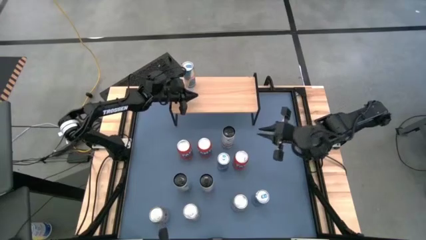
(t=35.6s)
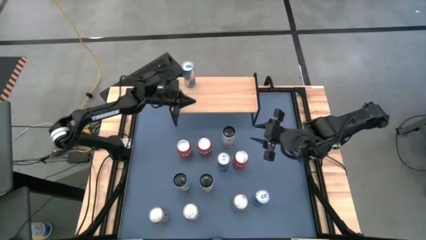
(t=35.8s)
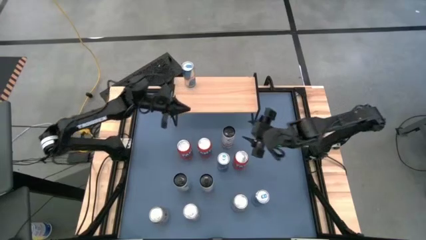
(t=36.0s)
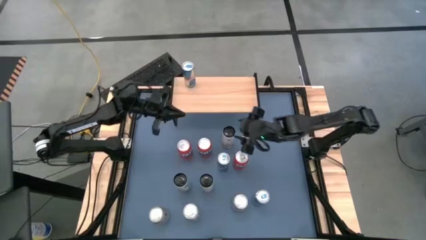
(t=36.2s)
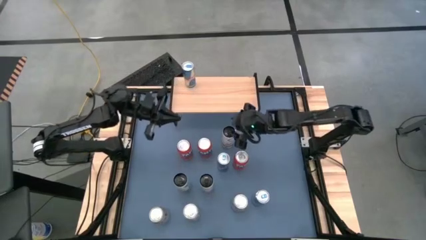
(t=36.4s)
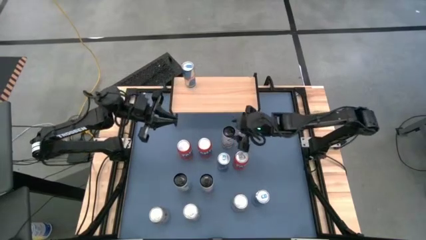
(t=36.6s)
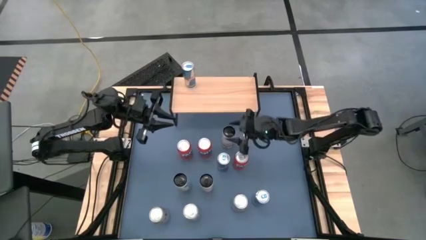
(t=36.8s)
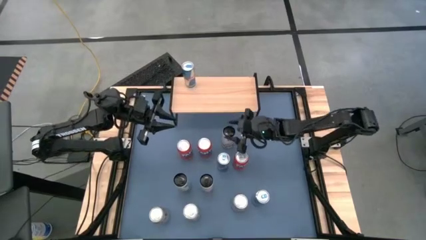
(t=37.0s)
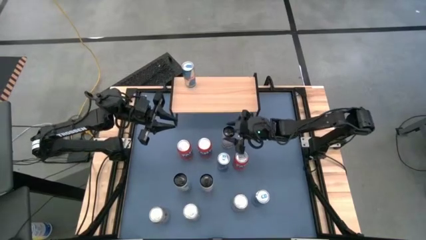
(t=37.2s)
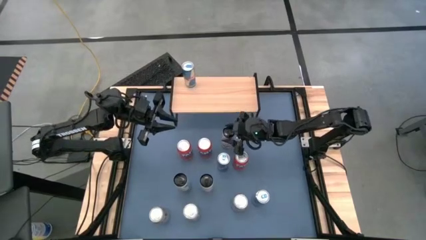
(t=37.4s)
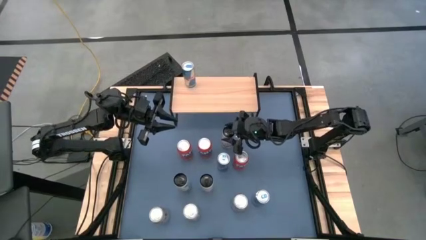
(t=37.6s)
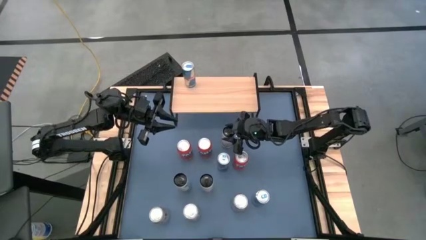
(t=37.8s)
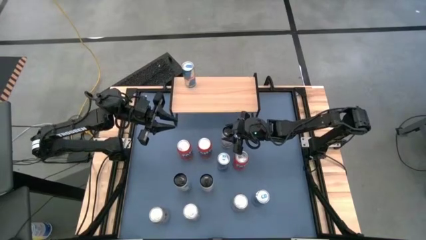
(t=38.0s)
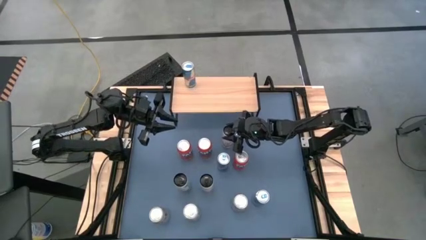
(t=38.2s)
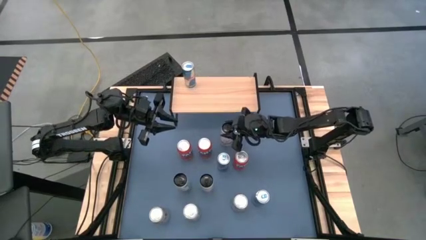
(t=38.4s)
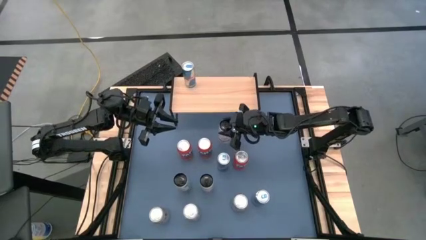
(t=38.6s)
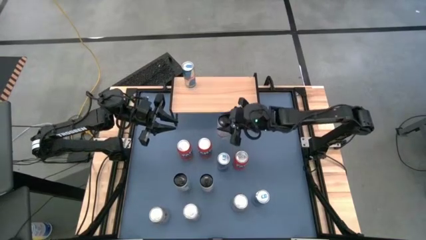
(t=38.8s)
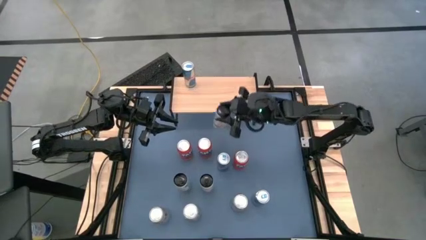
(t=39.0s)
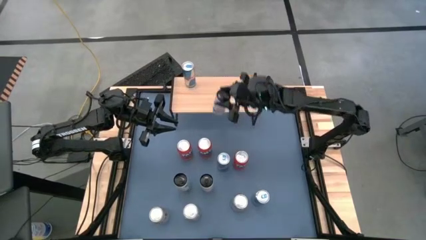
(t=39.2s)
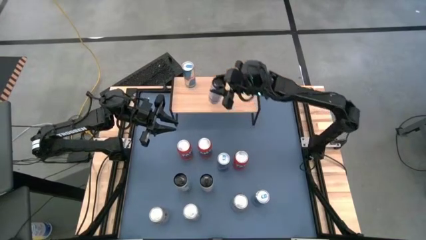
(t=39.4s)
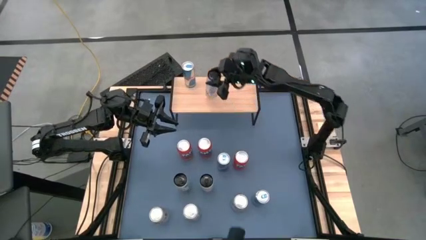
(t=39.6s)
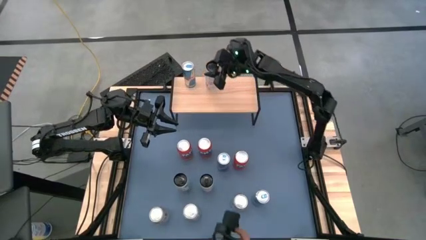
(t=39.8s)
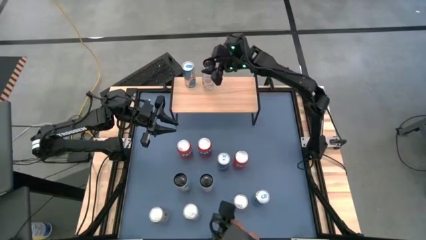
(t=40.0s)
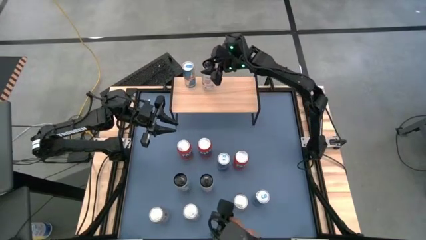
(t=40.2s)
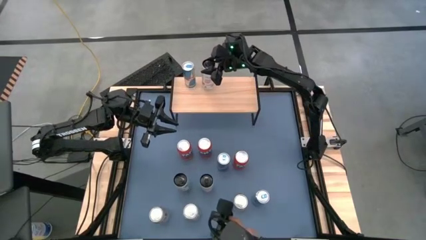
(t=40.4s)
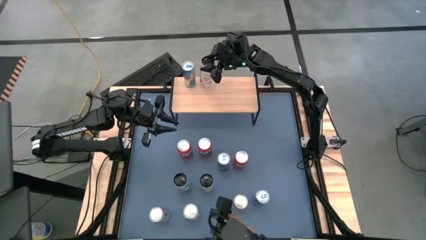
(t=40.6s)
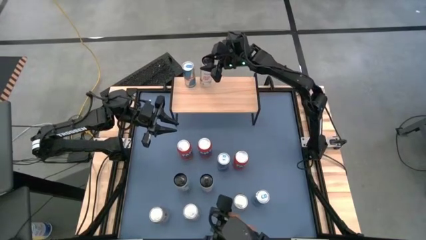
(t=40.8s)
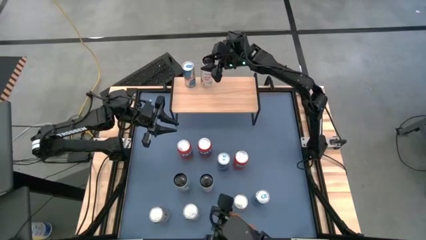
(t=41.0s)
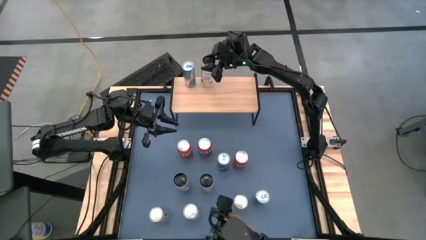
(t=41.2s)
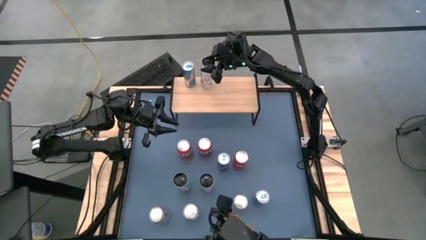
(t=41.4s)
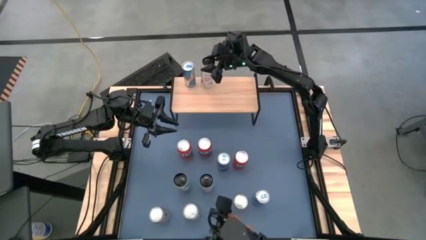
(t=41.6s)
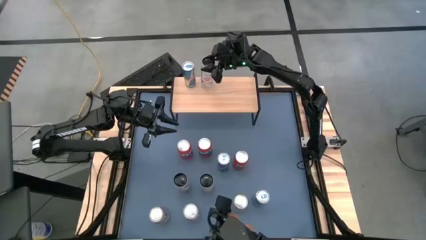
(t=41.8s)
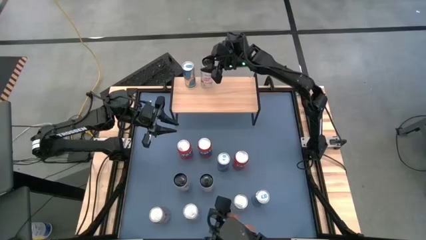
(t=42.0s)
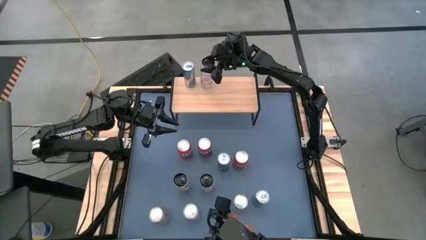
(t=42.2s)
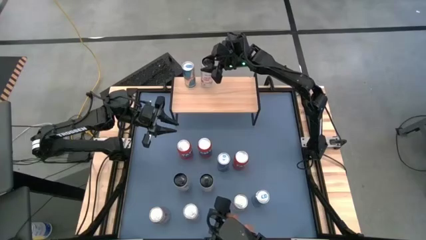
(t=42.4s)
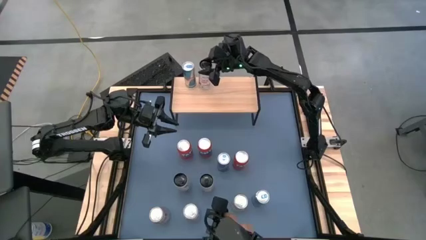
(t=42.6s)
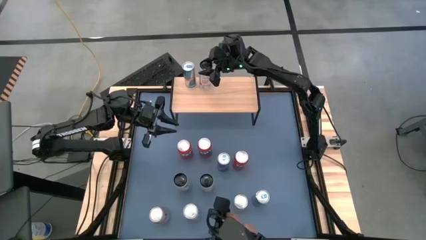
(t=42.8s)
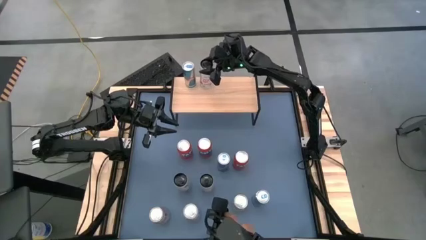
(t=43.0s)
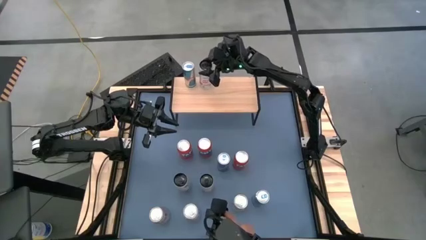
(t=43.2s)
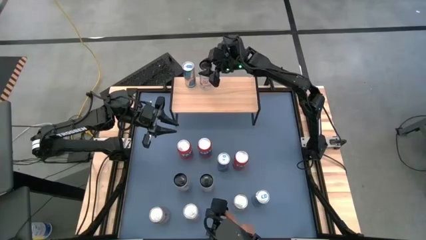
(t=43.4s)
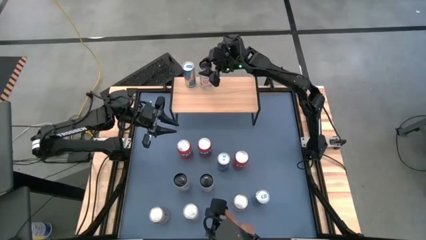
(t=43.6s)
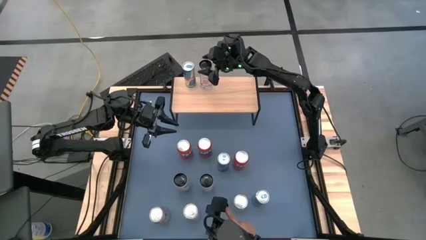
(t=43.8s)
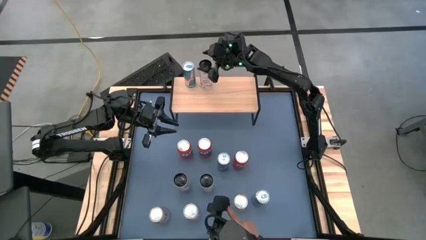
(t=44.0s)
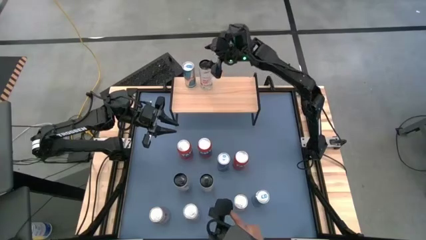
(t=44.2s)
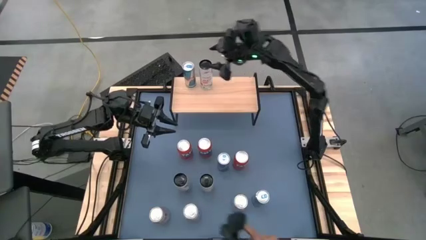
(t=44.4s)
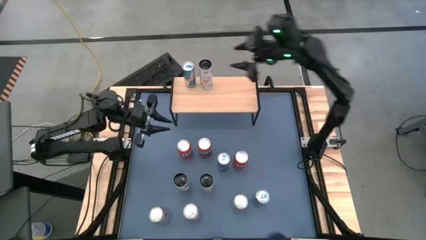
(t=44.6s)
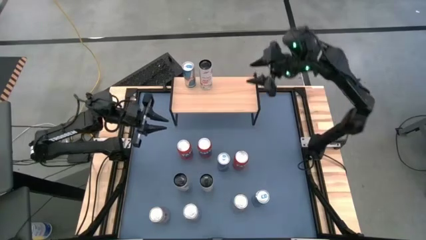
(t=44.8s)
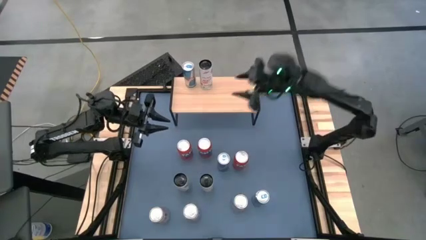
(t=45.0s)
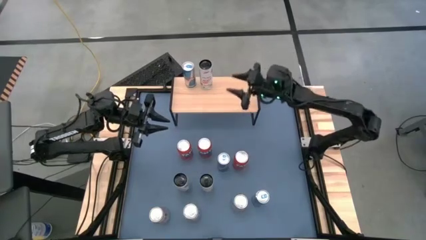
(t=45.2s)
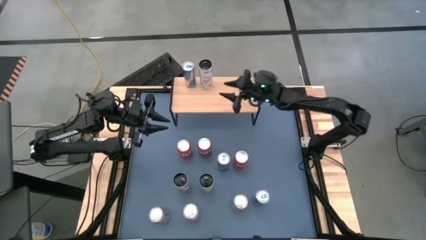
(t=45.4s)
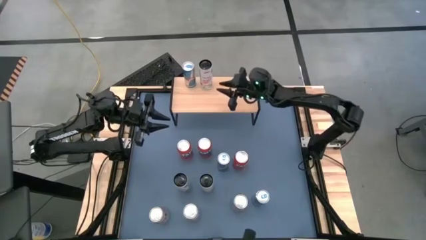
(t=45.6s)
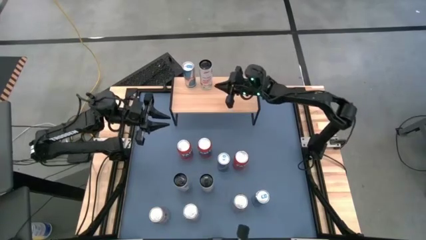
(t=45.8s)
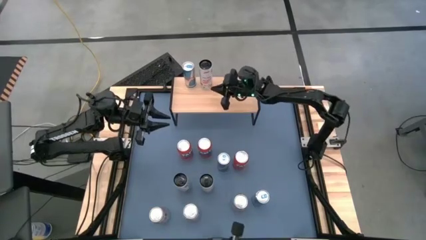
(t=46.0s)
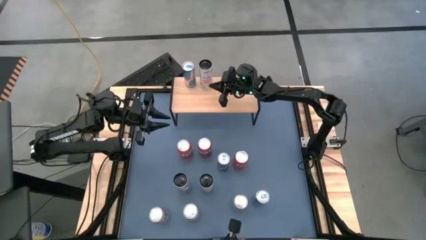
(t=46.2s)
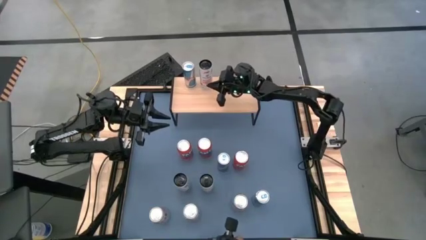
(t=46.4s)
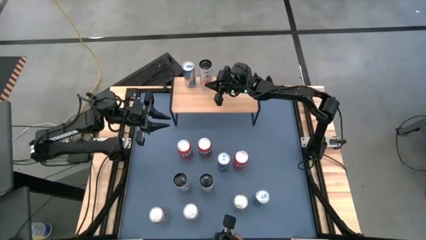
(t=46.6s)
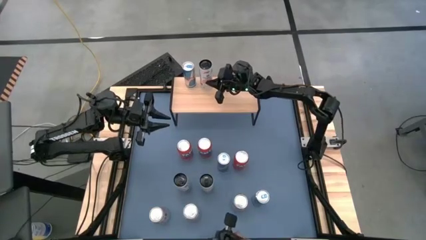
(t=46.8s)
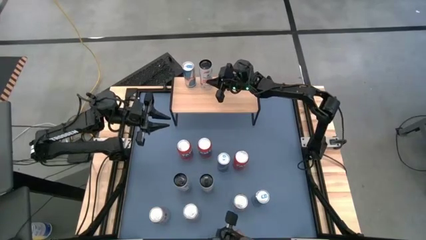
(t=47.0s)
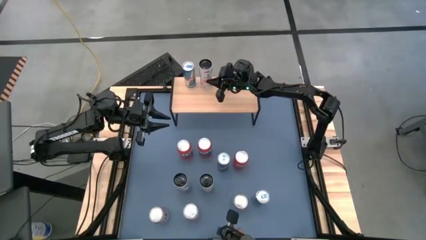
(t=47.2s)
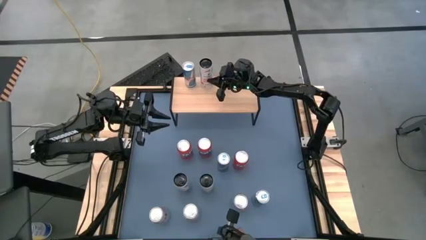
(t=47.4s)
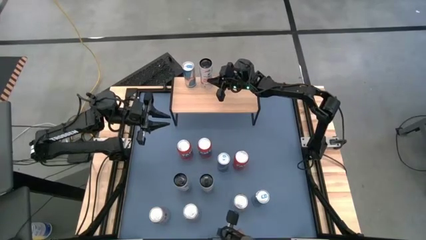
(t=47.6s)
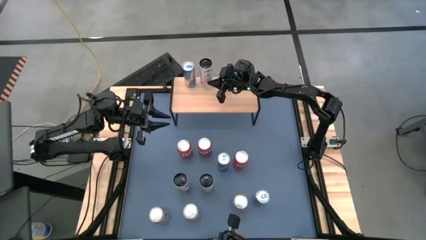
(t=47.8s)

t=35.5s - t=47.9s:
Task: Place canned beverage on shelf
Put the top pink soda can on the shelf
